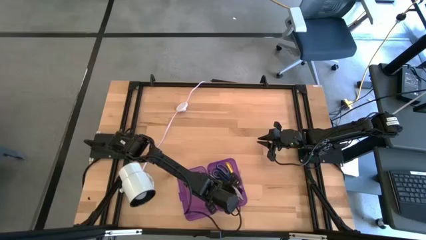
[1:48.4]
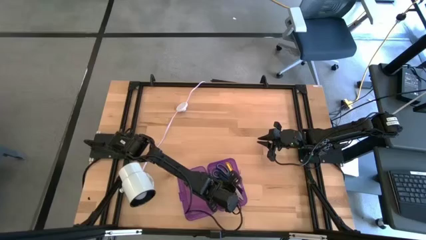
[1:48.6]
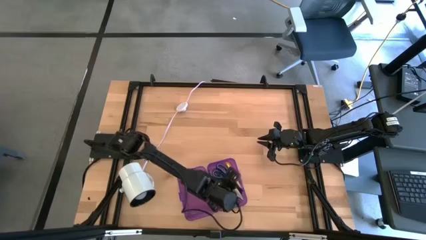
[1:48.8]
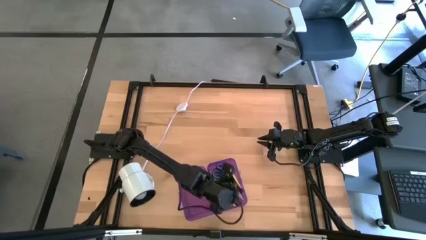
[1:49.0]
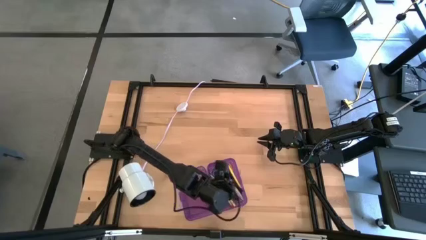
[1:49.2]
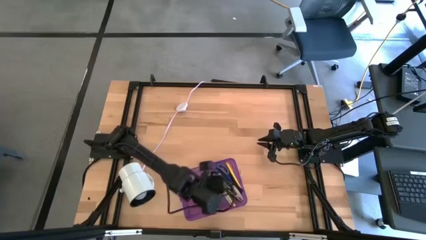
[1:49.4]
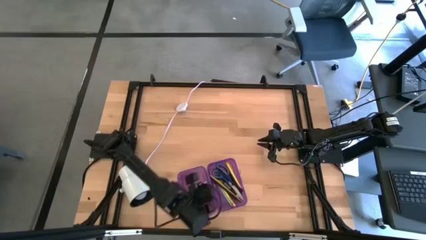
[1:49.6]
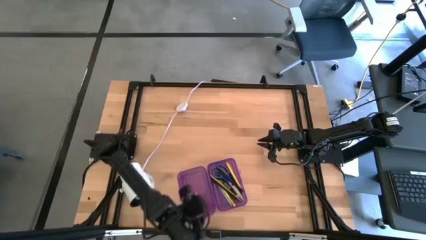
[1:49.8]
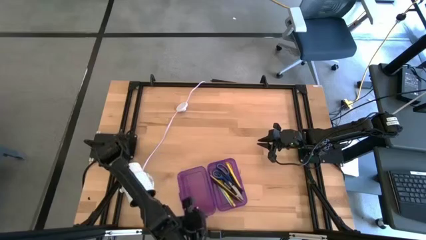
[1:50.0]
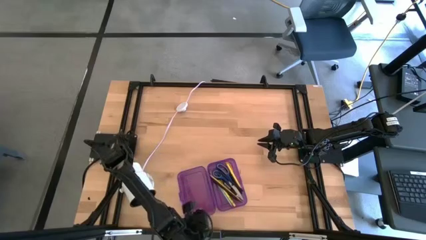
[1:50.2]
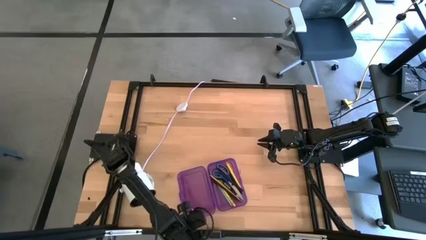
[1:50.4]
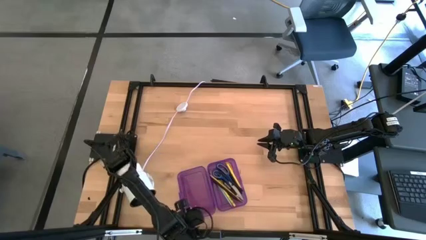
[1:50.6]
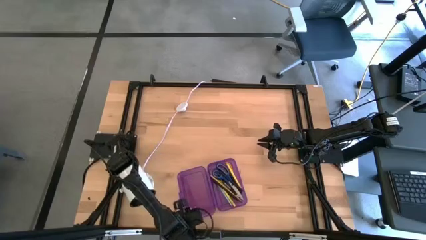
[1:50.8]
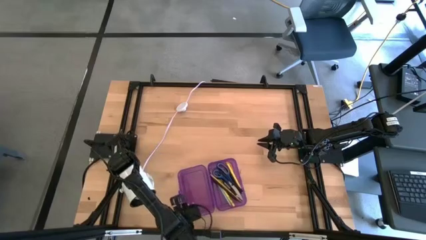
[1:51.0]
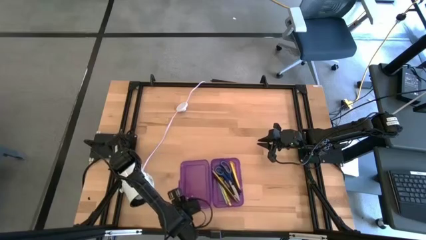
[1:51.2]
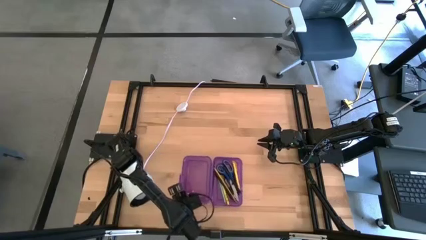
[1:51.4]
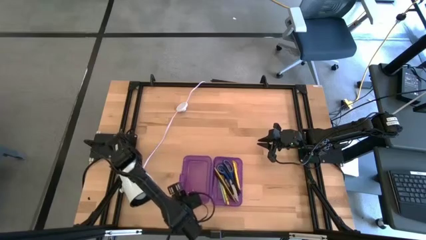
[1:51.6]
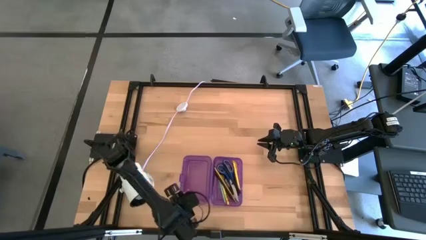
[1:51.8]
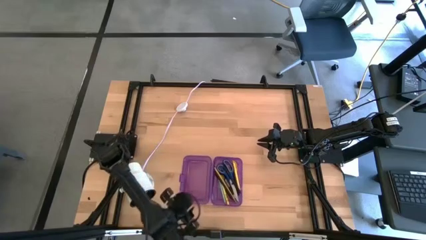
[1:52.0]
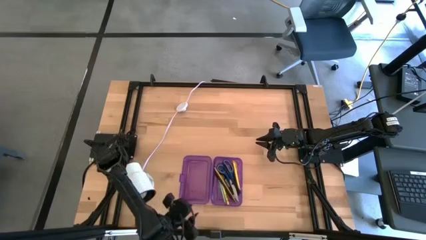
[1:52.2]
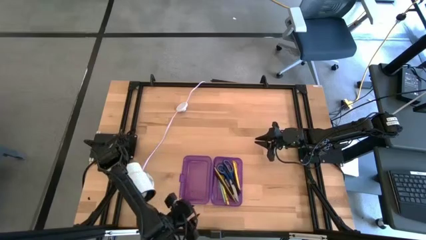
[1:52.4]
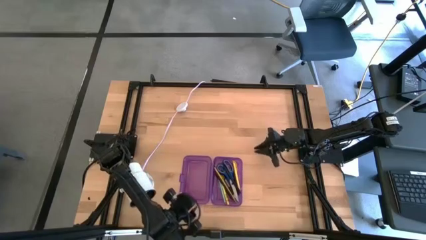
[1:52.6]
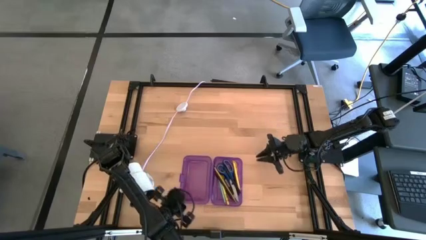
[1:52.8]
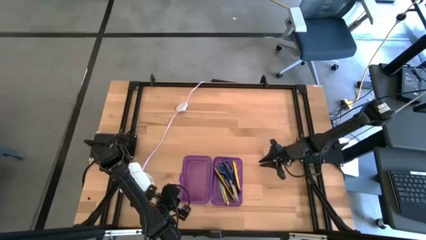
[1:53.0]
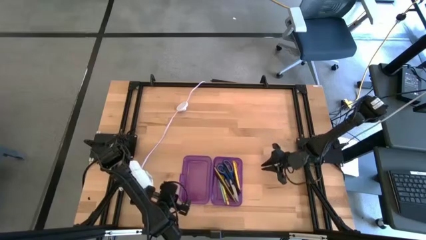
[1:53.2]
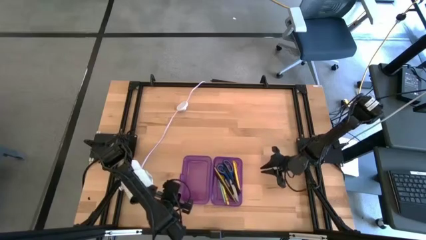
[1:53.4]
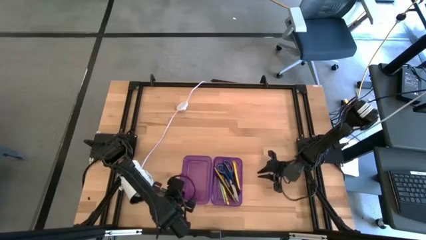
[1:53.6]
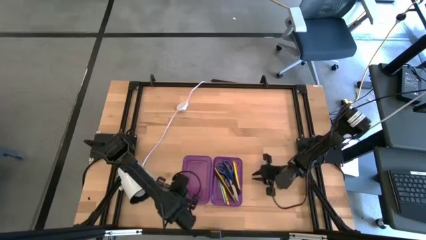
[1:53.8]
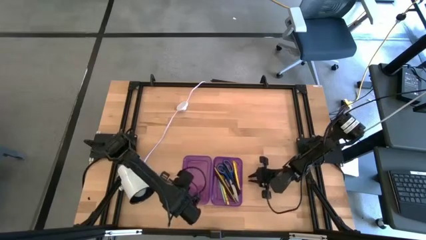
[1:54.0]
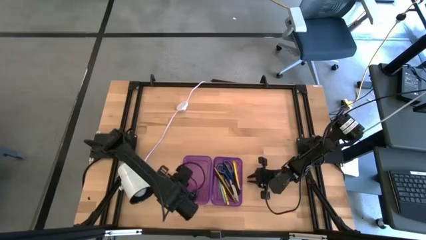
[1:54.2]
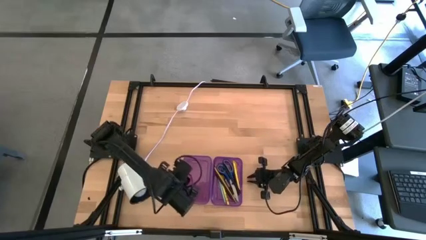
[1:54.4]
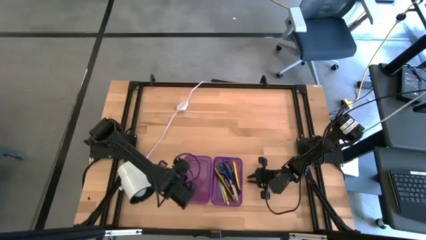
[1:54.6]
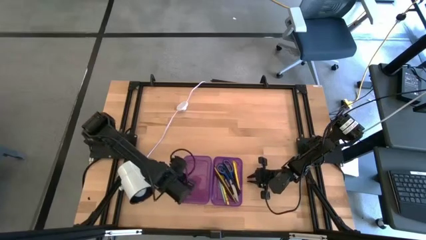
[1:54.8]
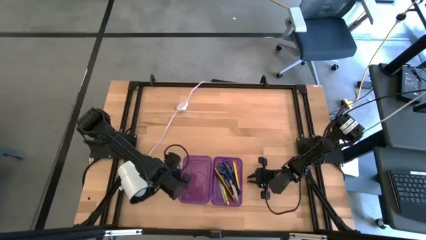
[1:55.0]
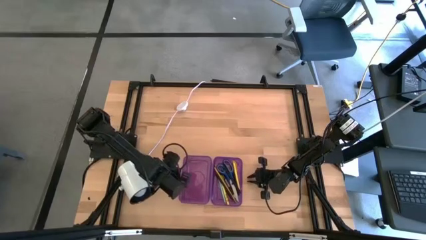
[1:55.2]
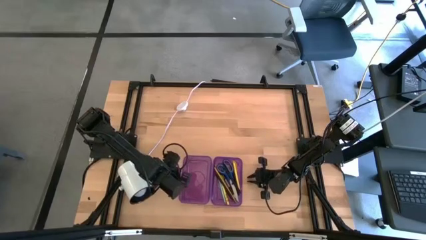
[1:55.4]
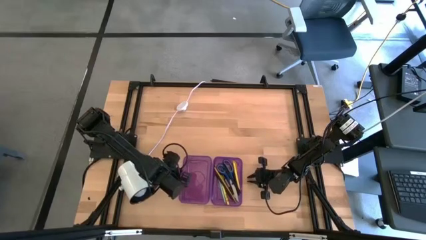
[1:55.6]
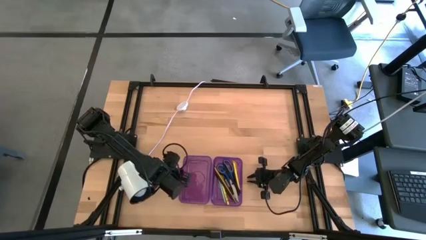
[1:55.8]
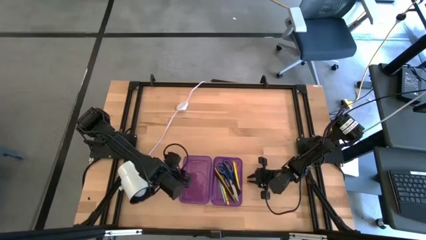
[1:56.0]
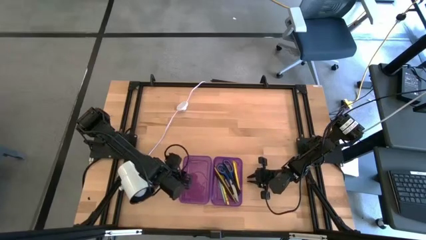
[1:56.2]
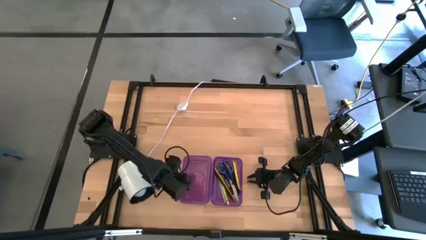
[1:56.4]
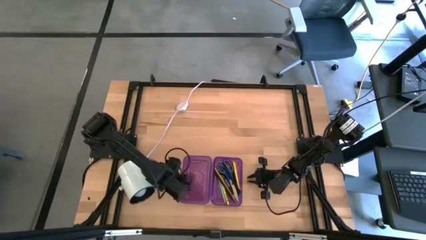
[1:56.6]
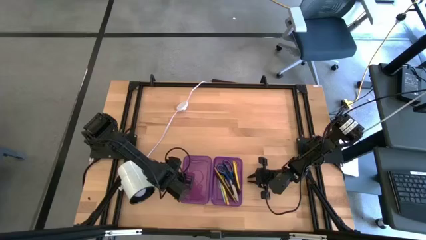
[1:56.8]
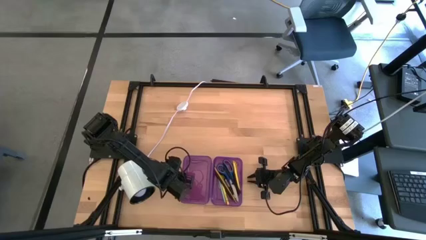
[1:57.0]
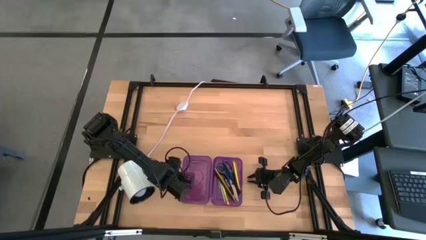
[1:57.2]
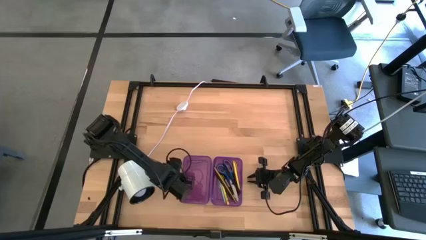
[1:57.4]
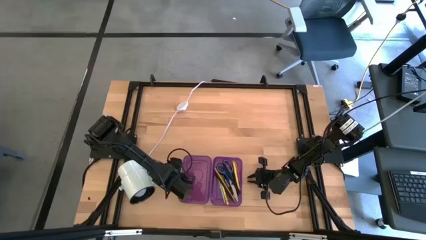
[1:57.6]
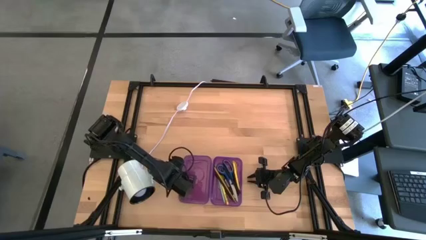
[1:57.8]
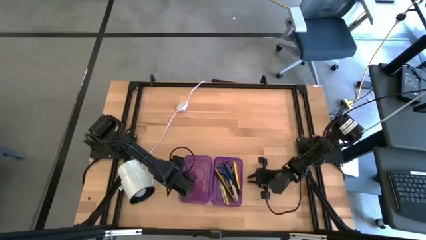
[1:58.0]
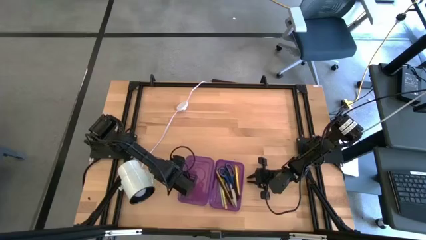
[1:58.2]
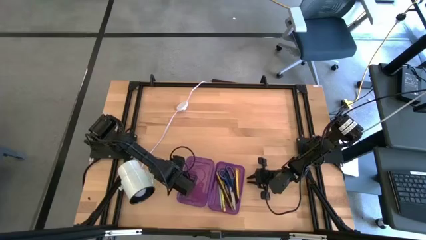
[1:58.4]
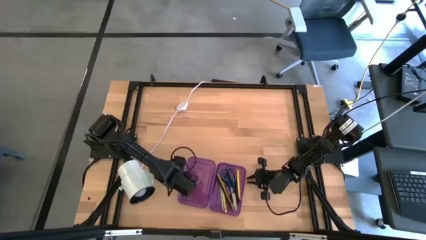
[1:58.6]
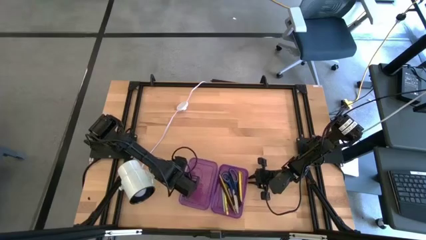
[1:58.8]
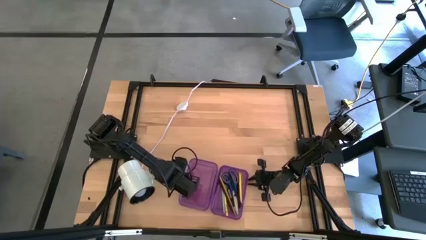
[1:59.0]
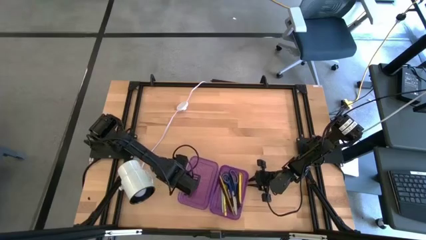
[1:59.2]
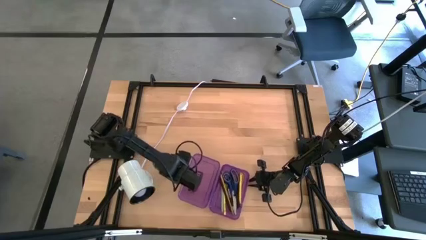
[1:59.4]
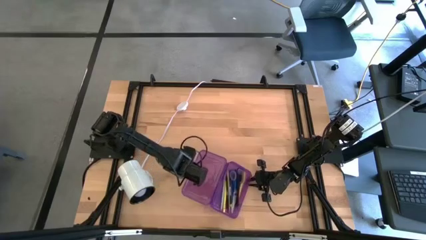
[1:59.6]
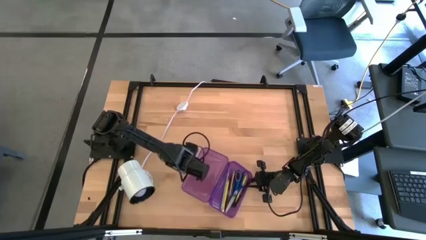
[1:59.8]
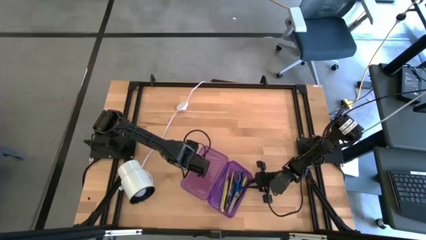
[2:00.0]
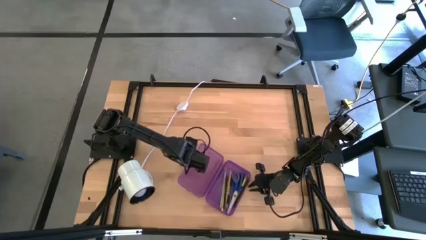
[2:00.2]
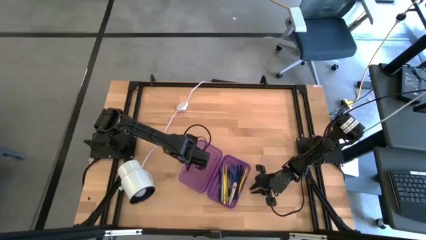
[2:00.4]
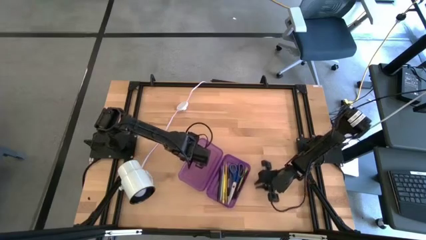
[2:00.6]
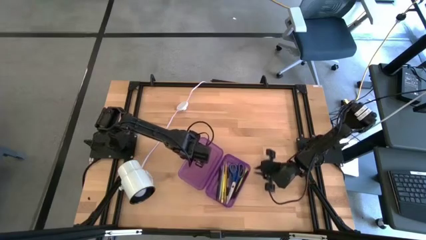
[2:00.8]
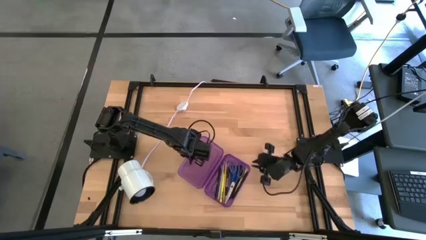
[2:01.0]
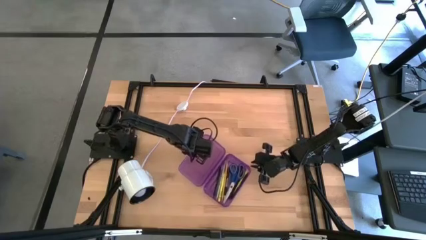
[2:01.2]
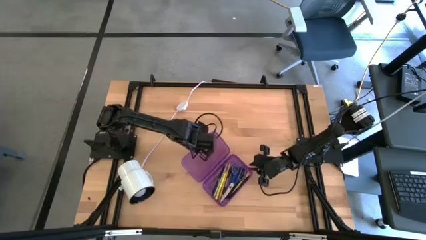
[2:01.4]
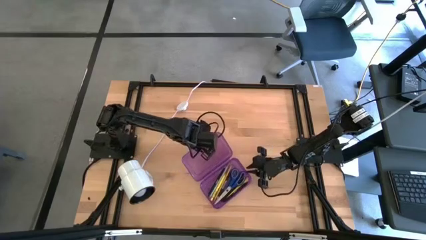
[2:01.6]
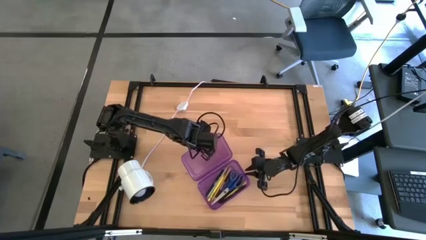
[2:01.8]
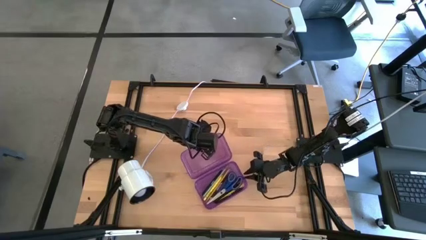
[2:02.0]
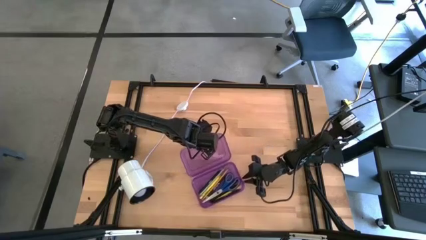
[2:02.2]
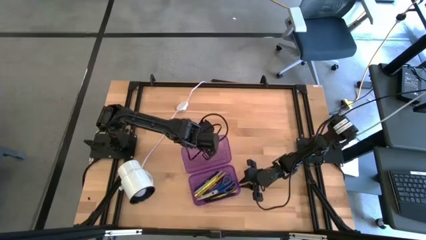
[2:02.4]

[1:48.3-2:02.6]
Task: Pick & place school supplies into a supply box
Close the purple supply box

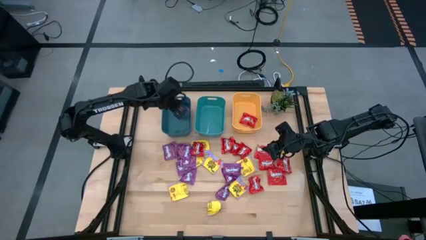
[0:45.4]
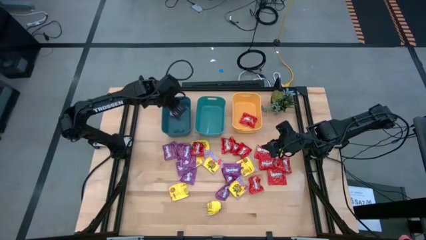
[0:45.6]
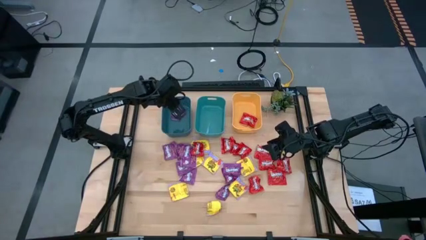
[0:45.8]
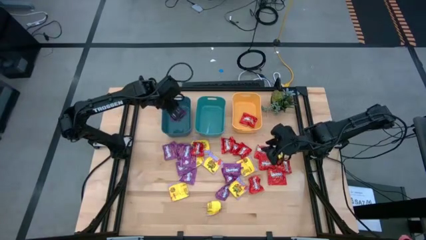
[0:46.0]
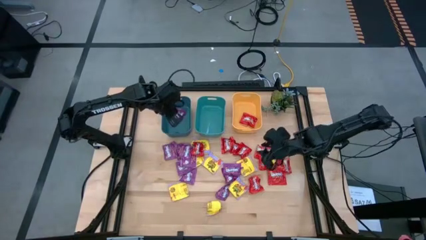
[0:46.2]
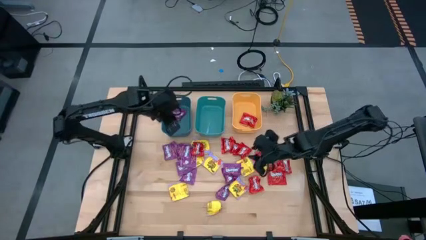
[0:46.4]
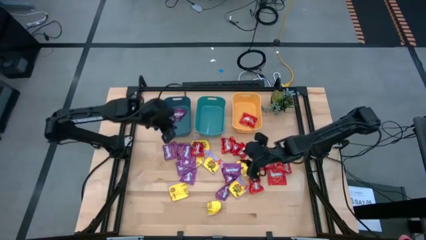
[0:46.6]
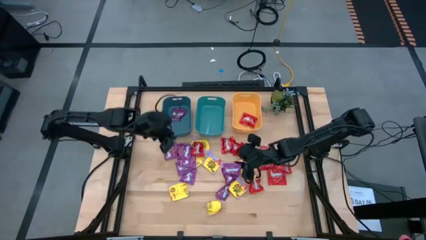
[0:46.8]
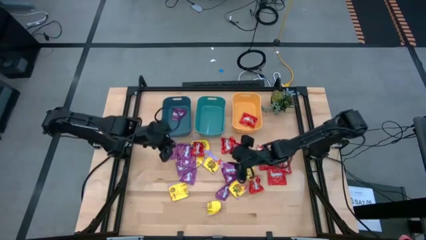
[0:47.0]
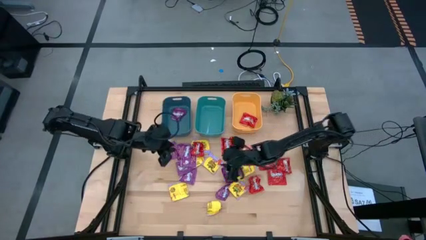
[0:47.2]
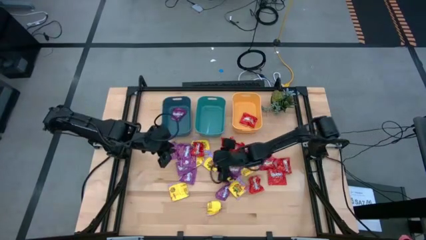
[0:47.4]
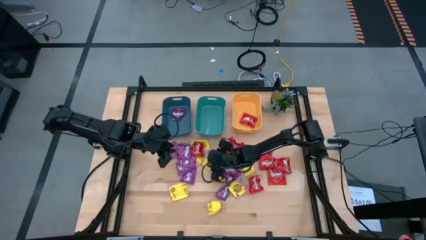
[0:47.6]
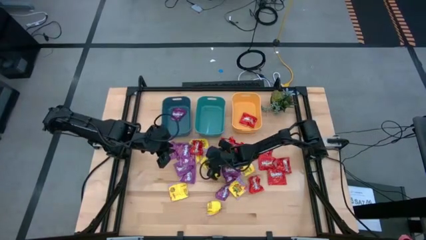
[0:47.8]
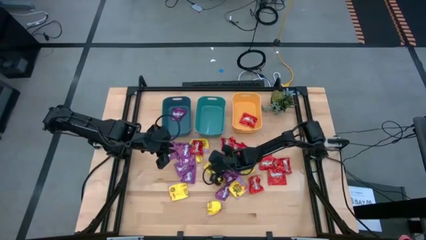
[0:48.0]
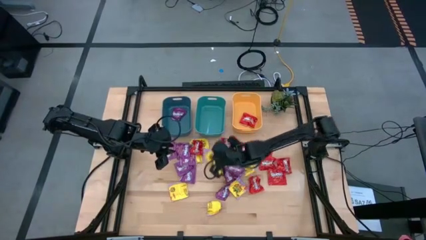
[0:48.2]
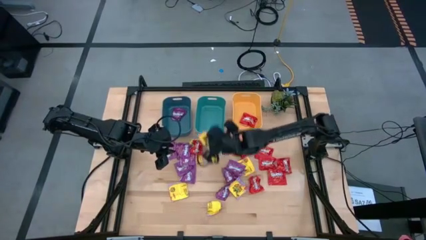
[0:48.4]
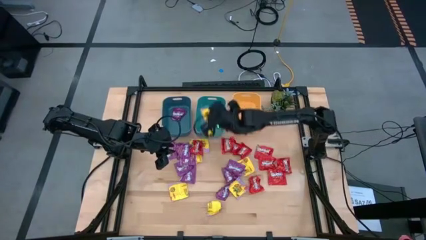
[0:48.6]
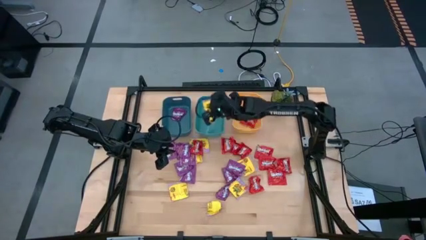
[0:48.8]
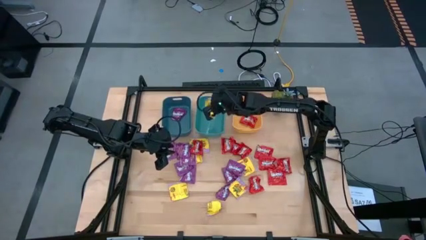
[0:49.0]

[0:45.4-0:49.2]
Task: Sort candy
Put the yellow candy into the green bin
